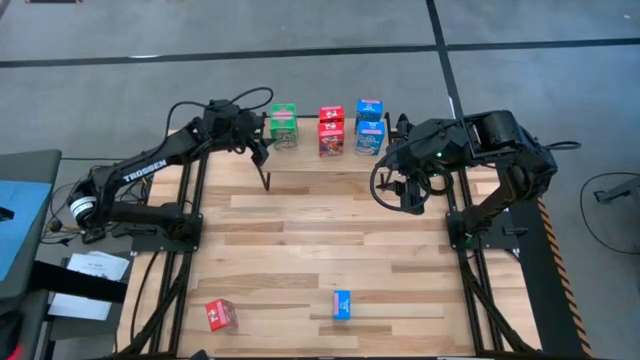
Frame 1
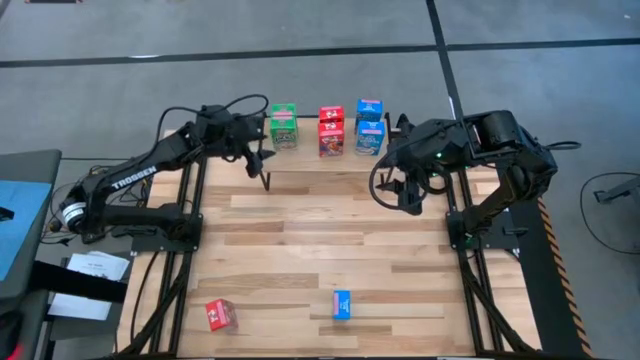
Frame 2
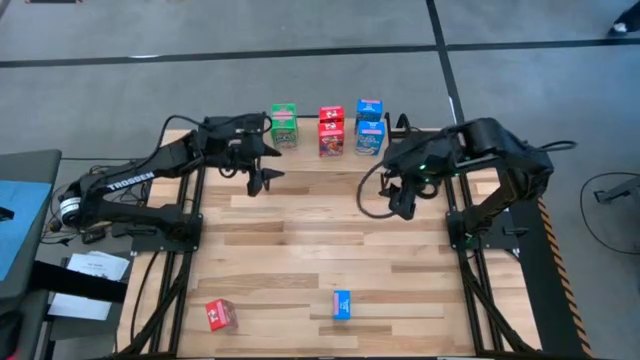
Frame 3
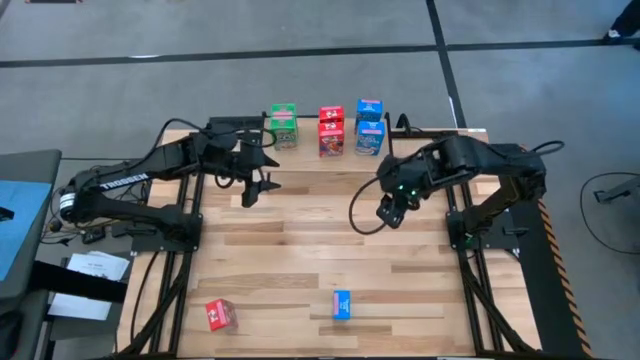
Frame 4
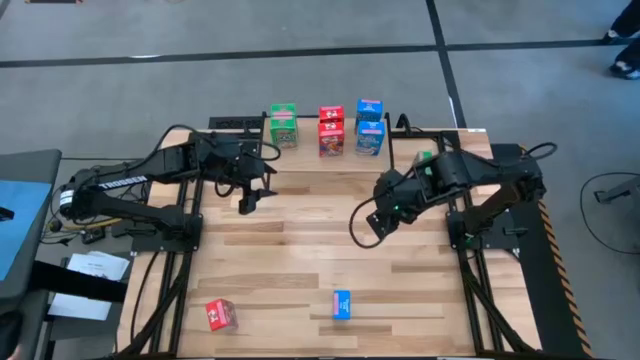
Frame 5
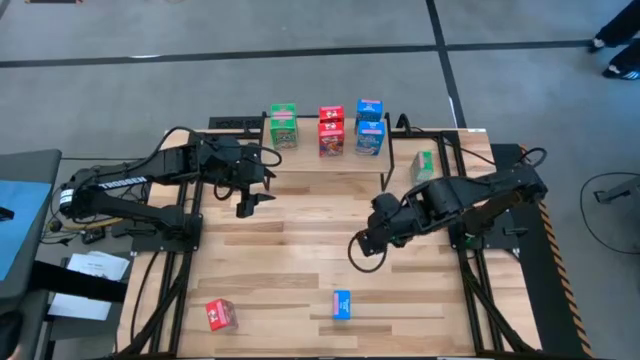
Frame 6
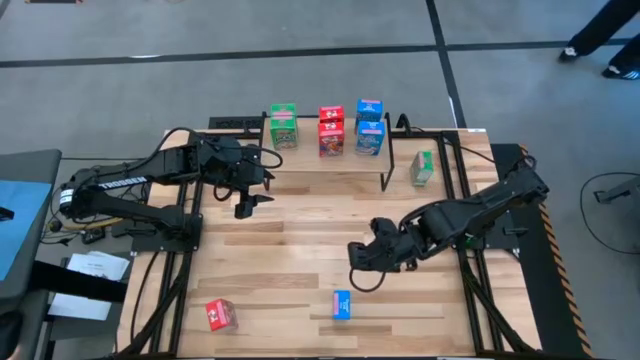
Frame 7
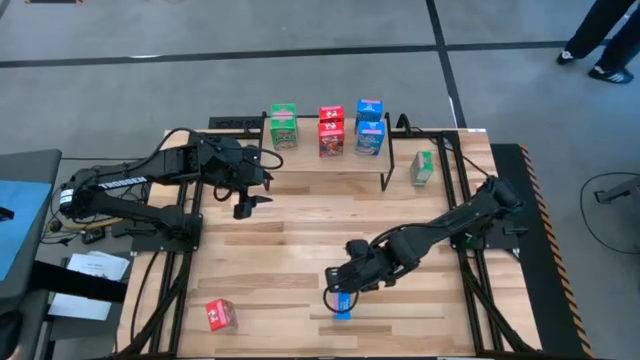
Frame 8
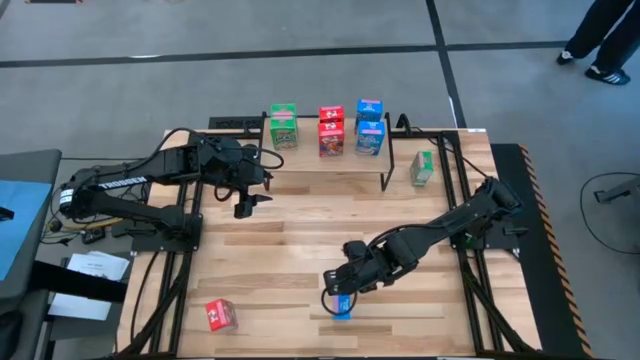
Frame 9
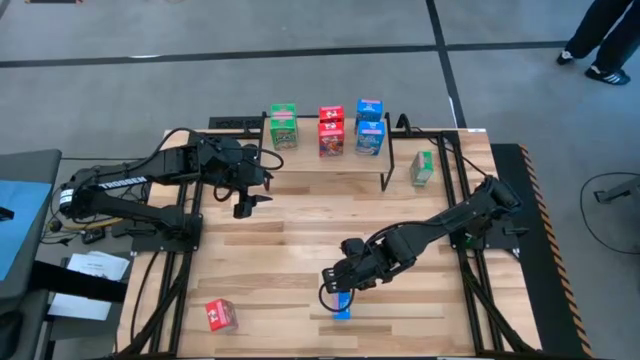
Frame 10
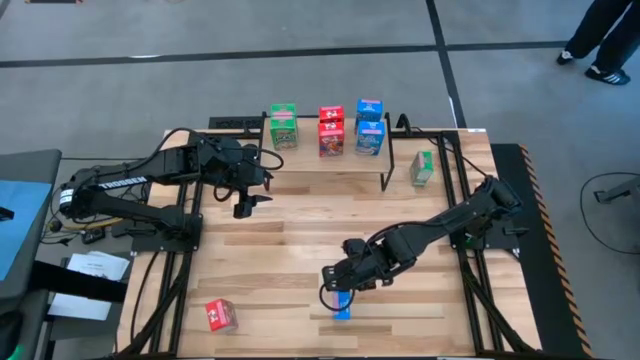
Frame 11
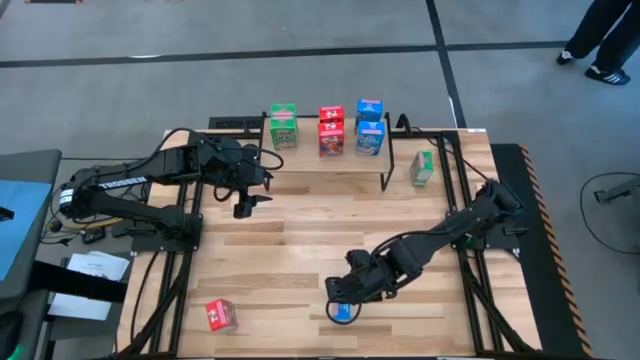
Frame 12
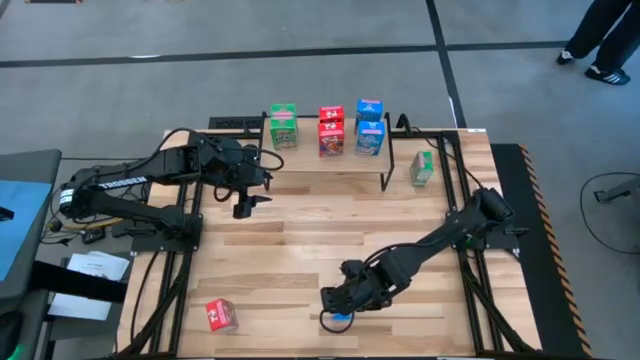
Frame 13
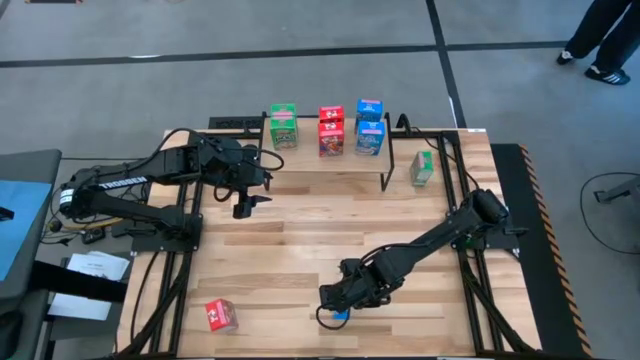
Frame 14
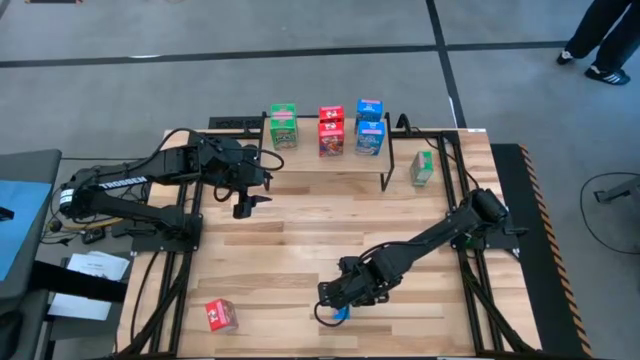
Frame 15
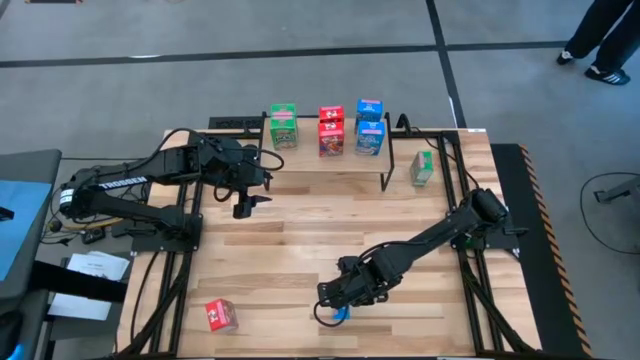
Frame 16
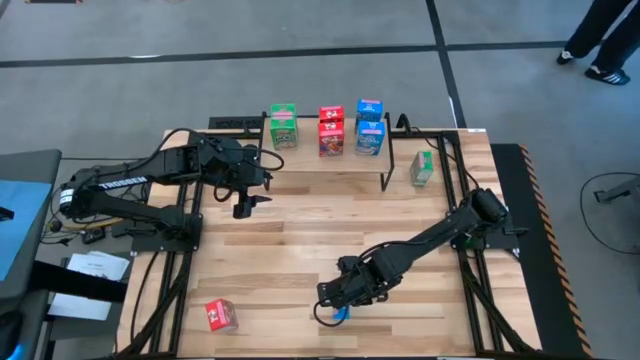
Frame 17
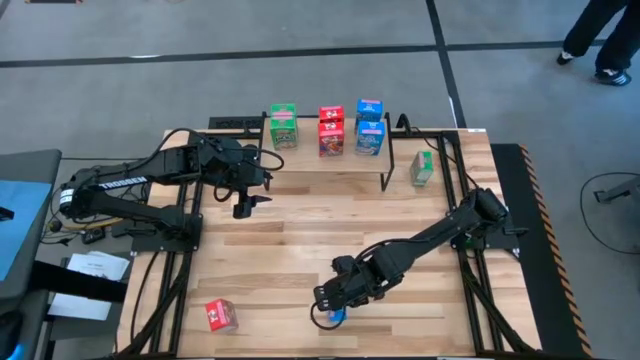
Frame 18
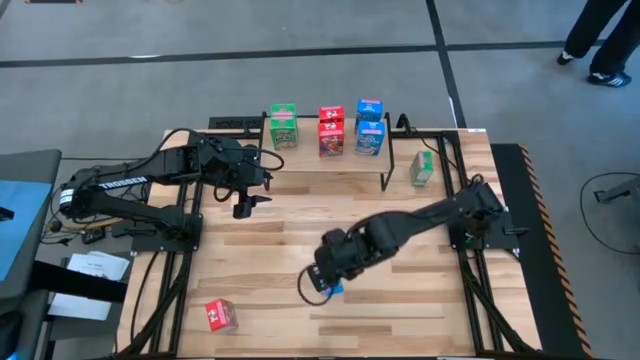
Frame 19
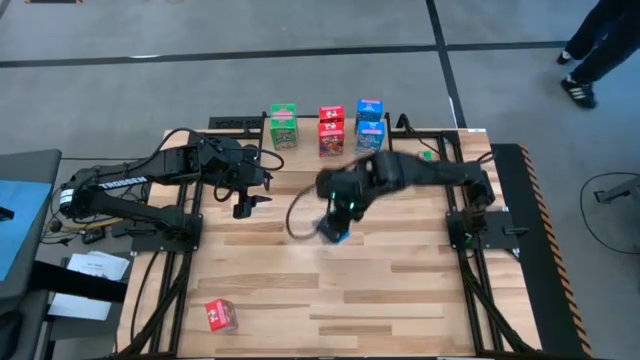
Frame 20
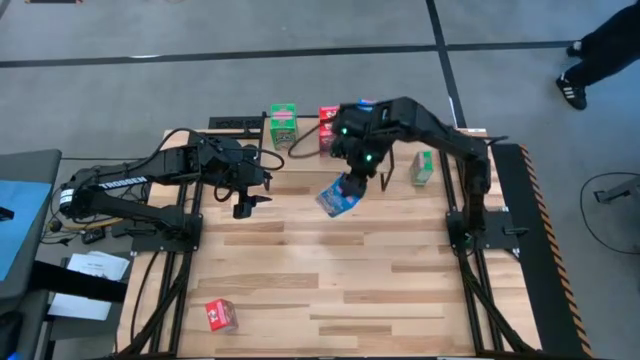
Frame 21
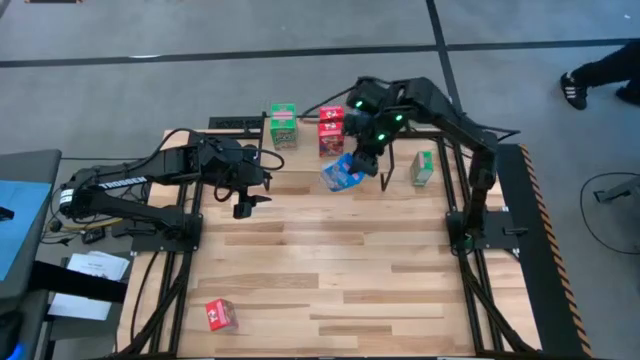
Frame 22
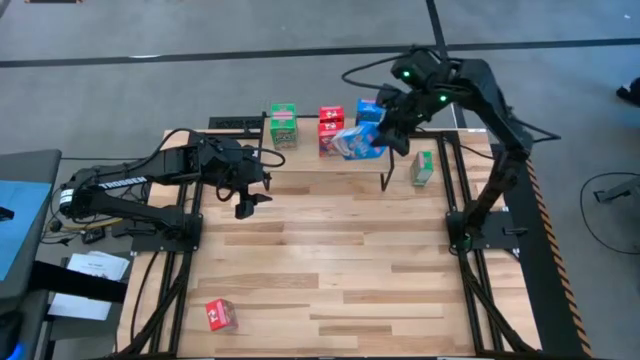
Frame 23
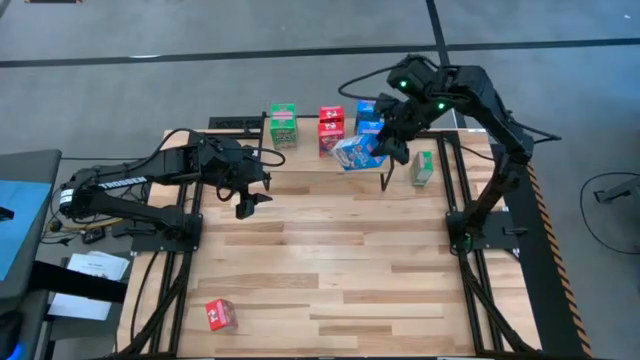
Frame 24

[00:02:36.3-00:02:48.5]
Task: Stack cereal on shelf
Put the blue cereal box on the shelf aligned with the other blue cereal box

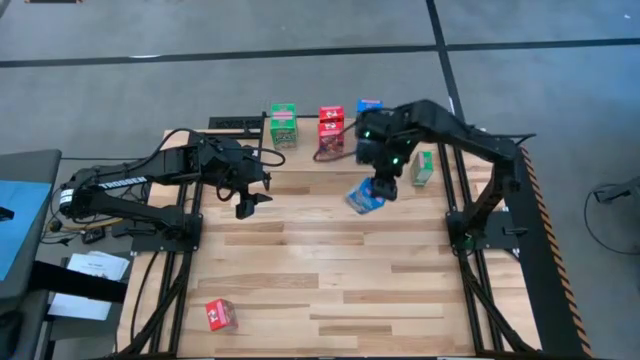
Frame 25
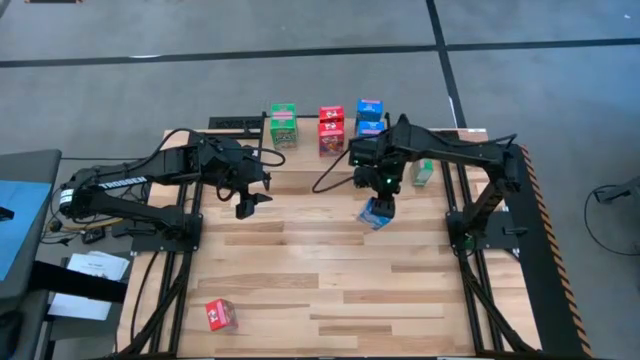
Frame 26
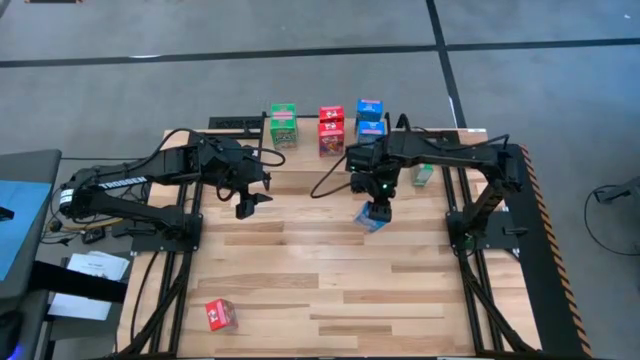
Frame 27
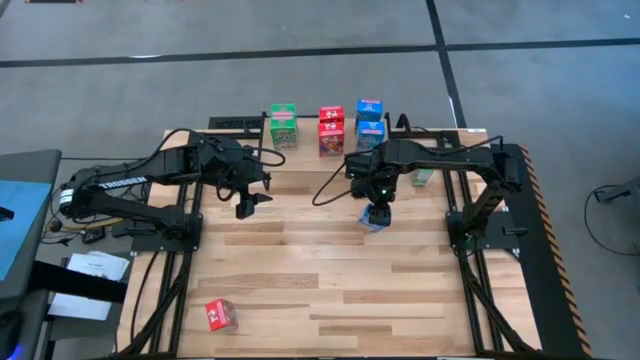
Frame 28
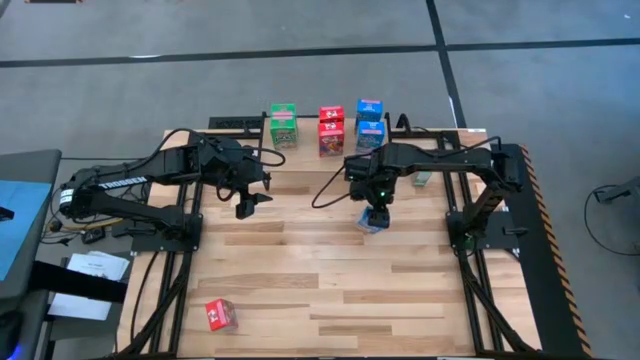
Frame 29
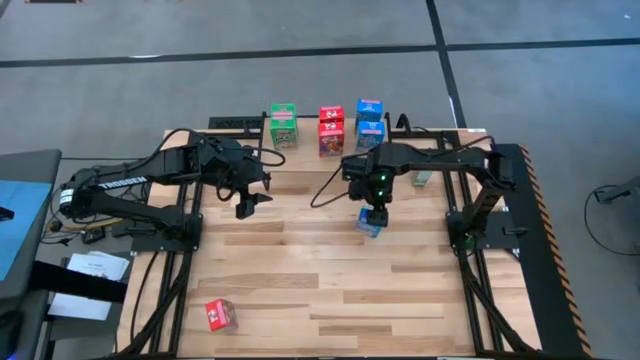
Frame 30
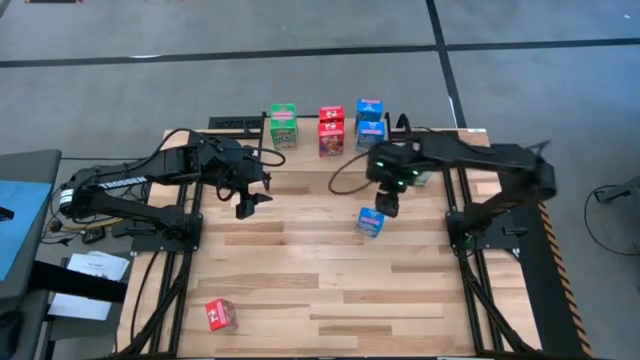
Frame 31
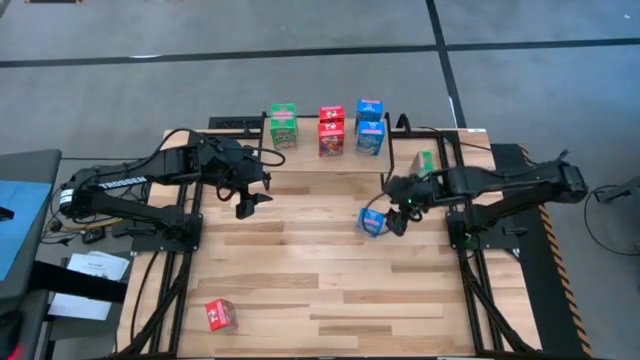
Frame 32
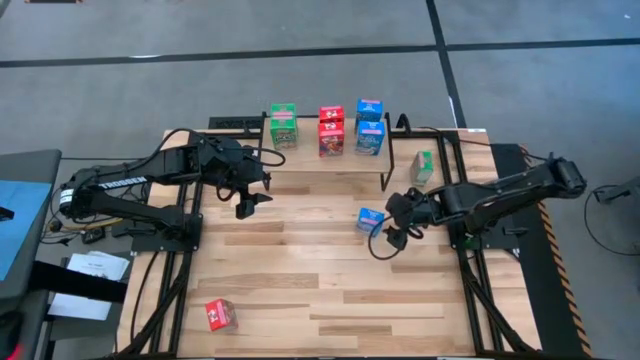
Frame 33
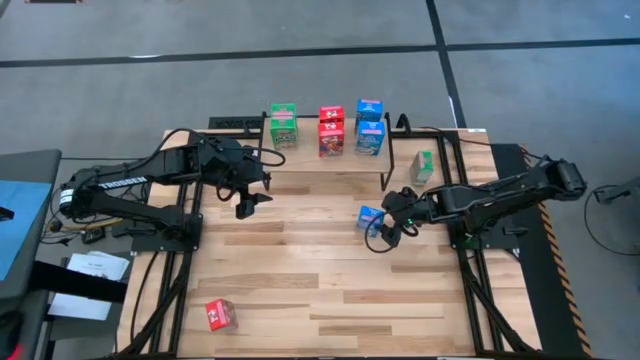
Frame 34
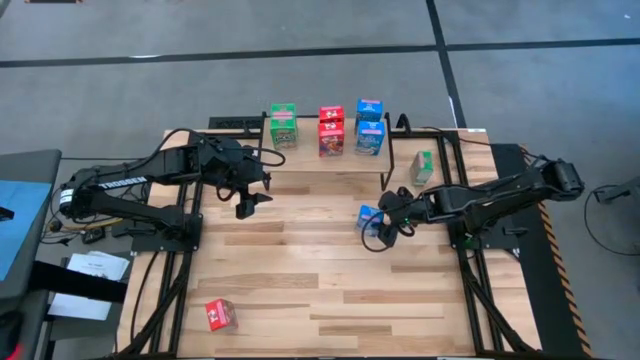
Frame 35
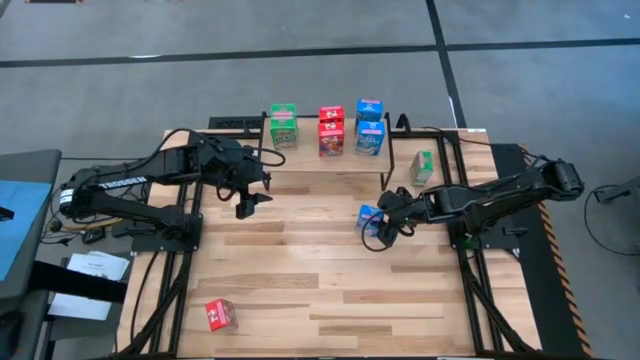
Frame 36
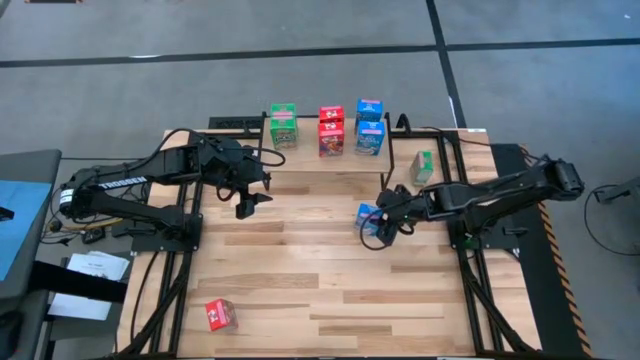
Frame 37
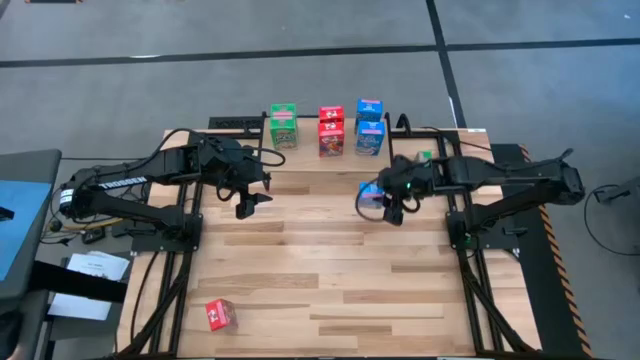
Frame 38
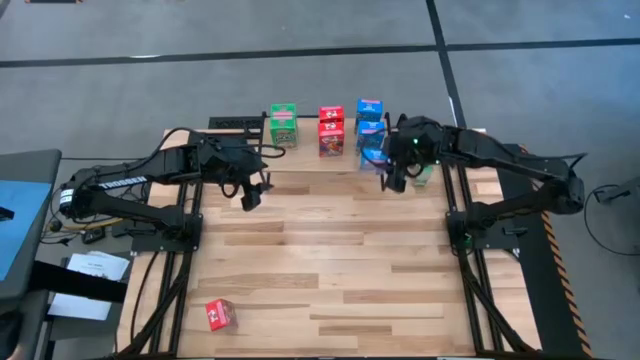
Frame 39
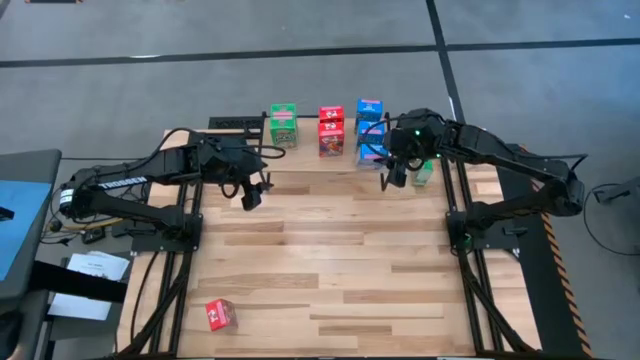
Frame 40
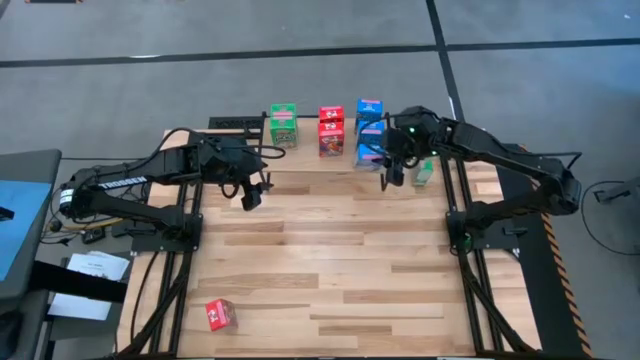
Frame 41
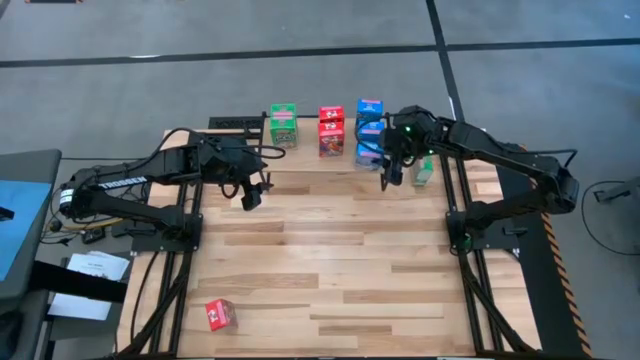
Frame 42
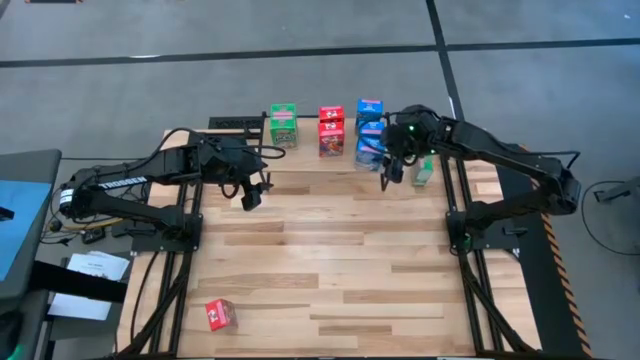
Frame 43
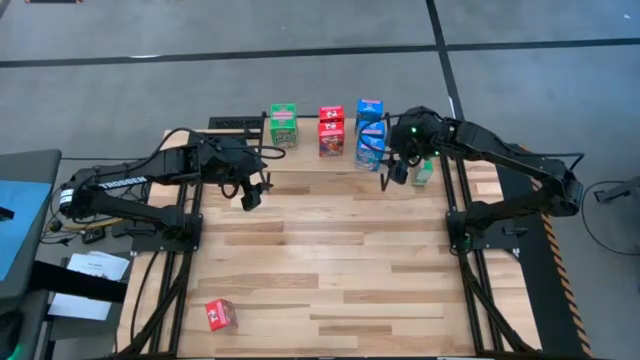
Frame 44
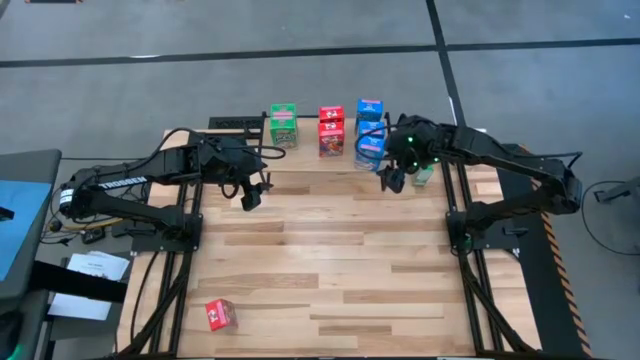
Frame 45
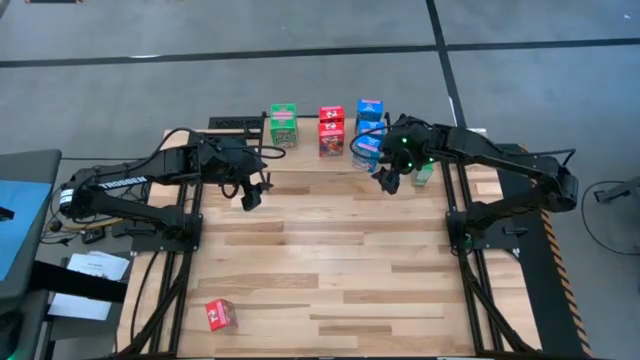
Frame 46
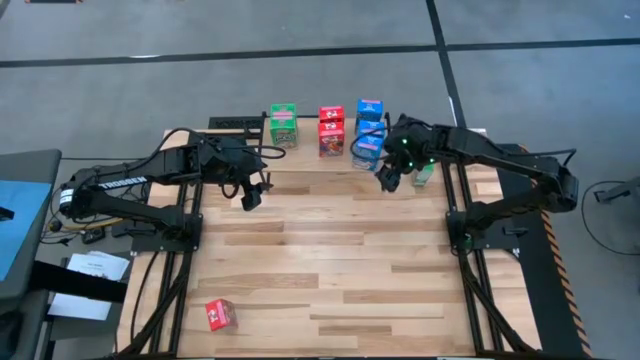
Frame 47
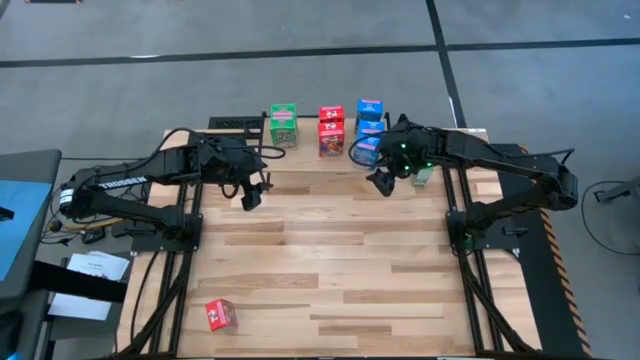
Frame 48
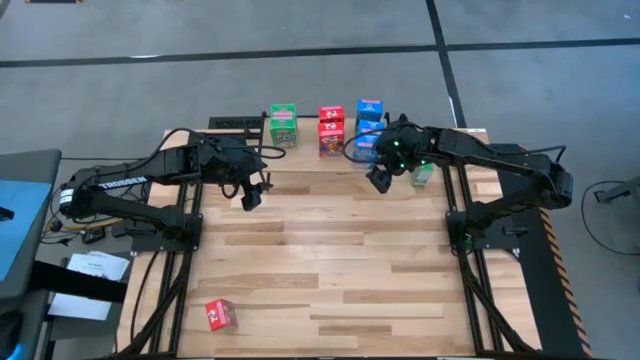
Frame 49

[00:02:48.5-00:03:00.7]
Put the blue cereal box on the shelf aligned with the other blue cereal box
